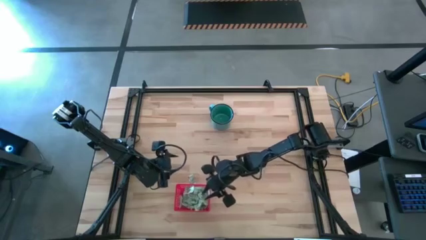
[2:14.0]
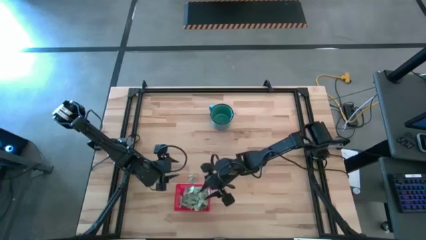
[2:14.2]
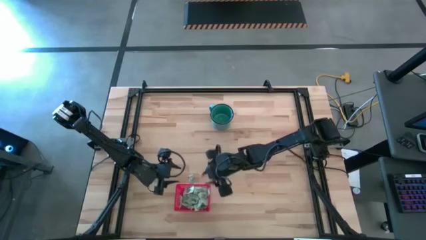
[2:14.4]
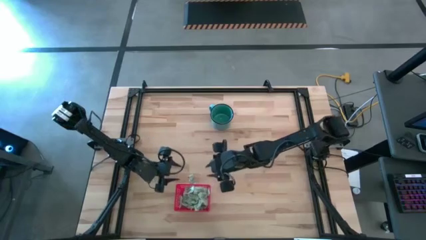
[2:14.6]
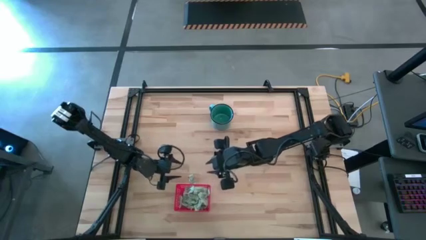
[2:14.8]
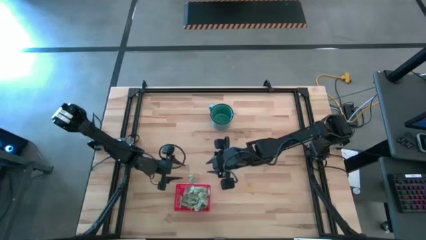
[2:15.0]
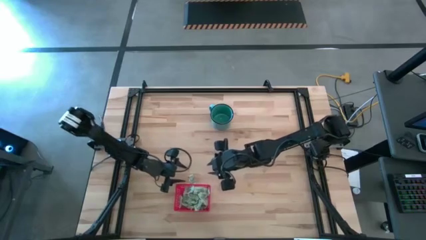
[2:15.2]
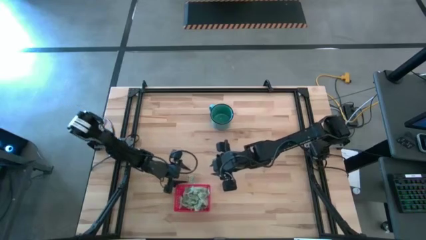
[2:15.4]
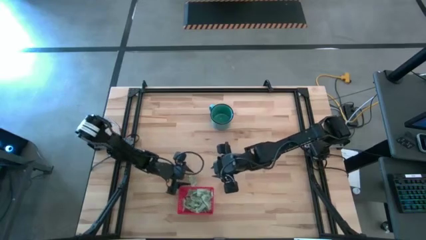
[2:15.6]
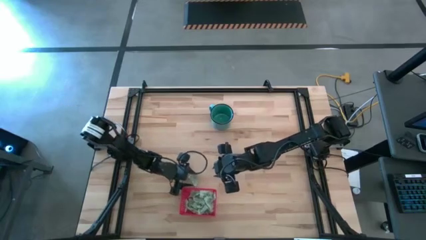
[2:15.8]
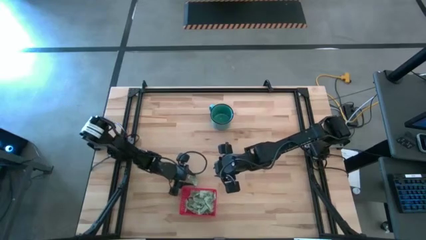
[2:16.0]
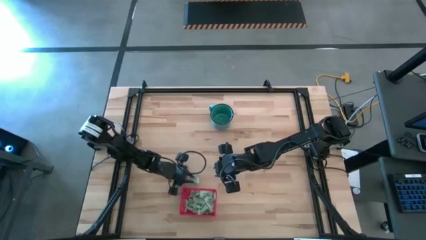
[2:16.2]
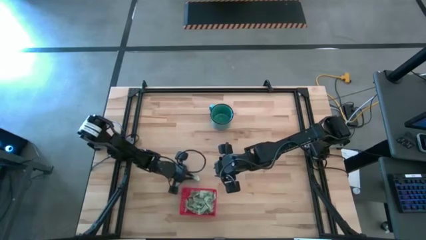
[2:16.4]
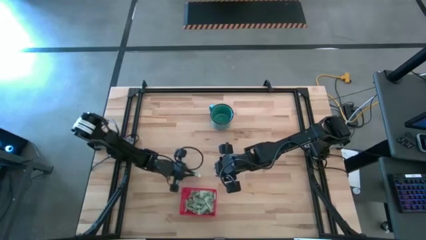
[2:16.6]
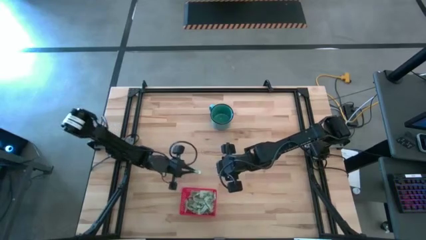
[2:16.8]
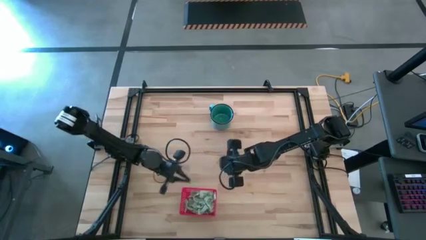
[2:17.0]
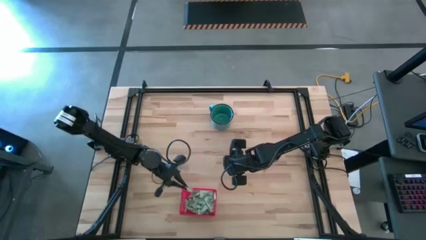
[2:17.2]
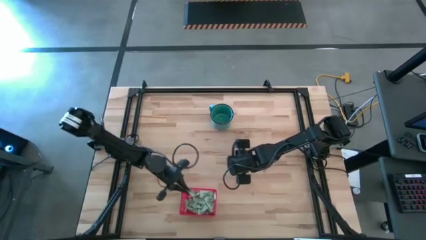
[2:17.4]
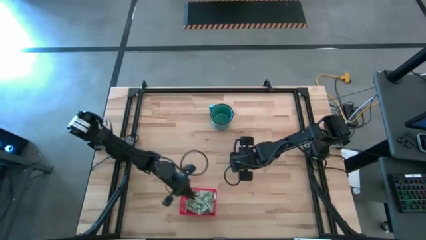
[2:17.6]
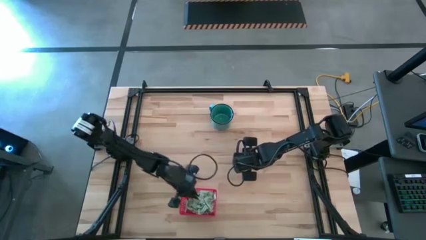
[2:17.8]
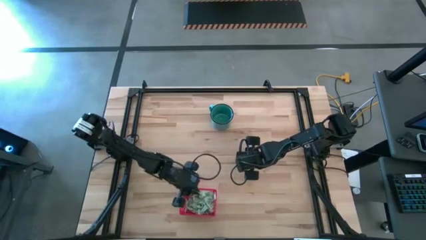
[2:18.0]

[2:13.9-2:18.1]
Task: Pick and place items into bin
Put the green stevia packet into the red bin

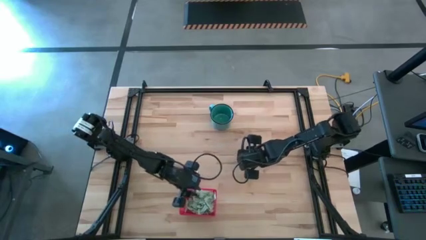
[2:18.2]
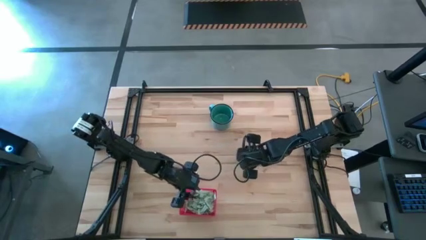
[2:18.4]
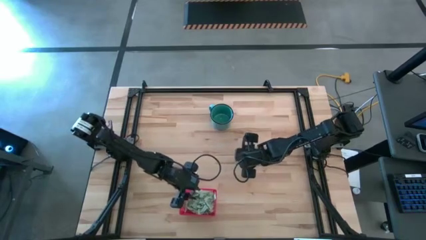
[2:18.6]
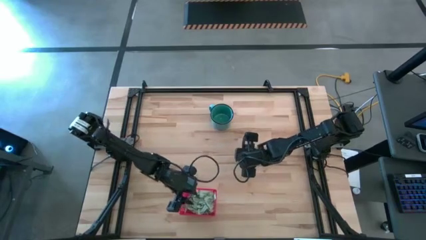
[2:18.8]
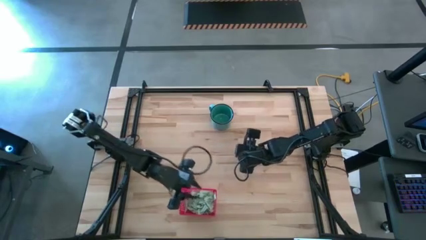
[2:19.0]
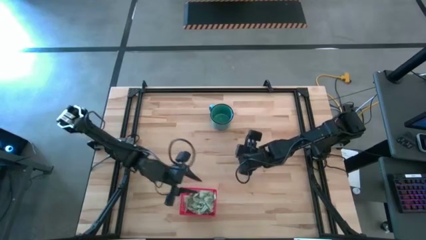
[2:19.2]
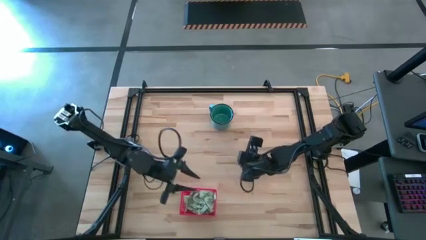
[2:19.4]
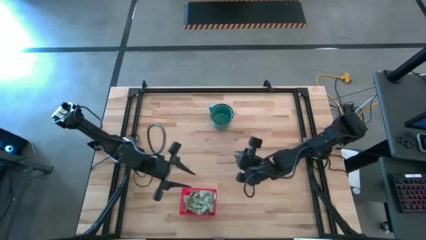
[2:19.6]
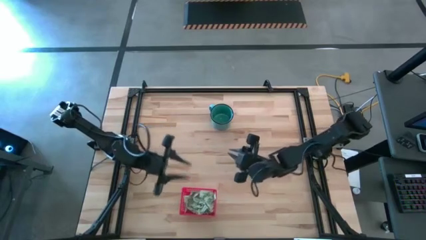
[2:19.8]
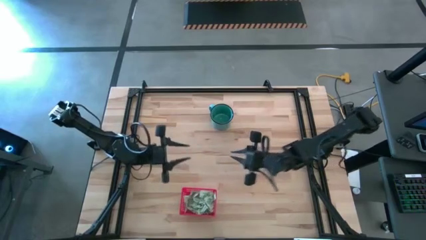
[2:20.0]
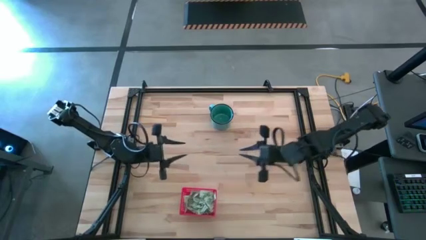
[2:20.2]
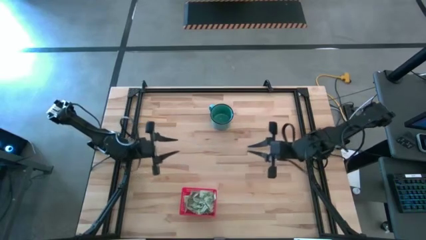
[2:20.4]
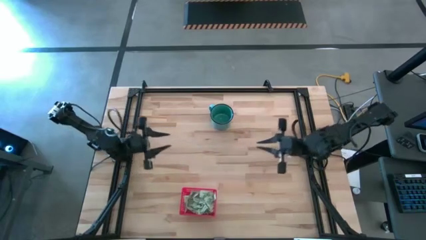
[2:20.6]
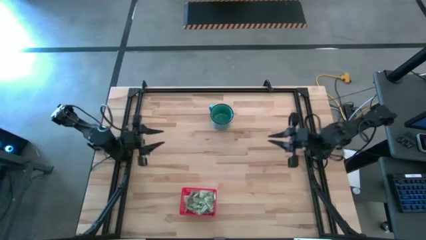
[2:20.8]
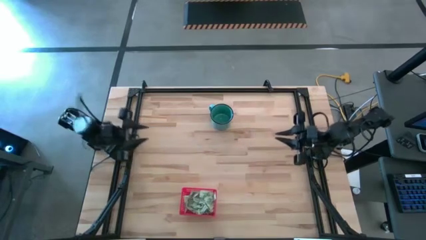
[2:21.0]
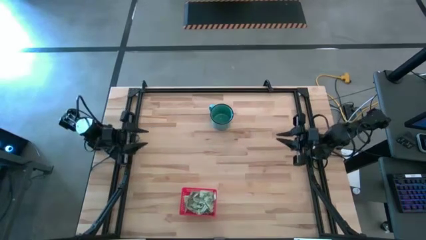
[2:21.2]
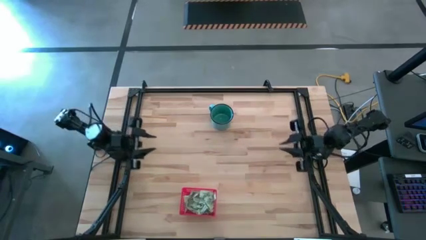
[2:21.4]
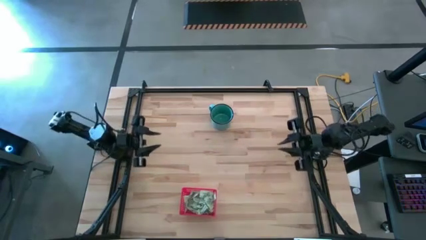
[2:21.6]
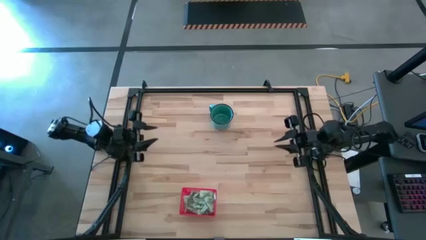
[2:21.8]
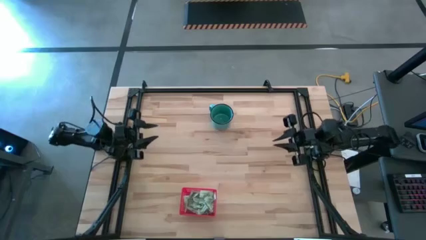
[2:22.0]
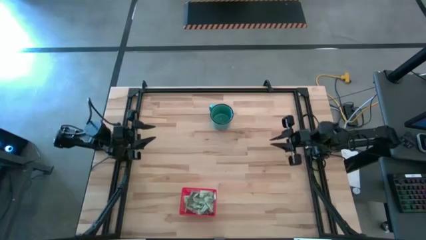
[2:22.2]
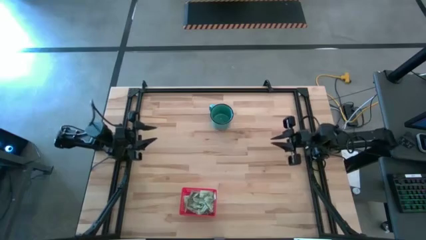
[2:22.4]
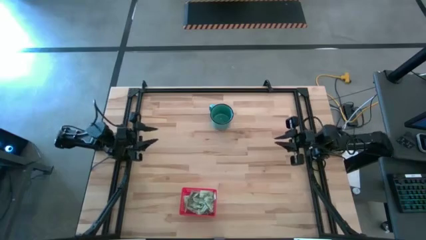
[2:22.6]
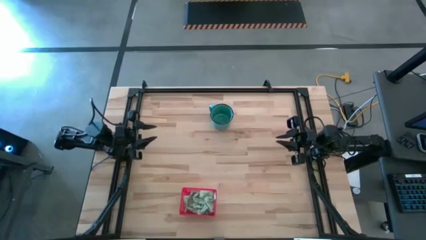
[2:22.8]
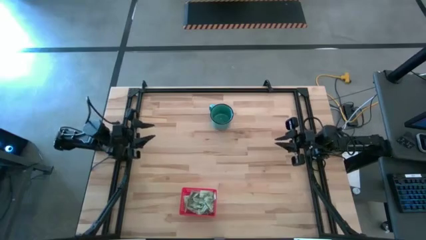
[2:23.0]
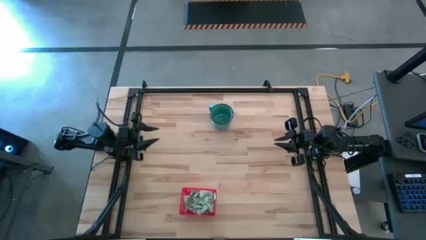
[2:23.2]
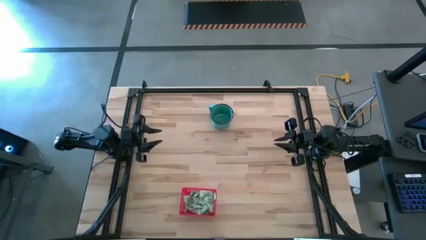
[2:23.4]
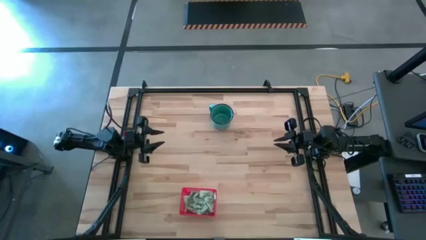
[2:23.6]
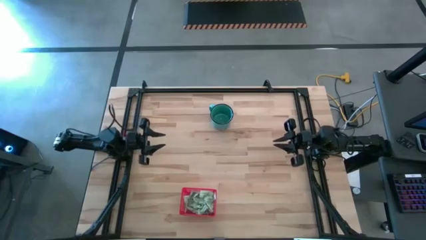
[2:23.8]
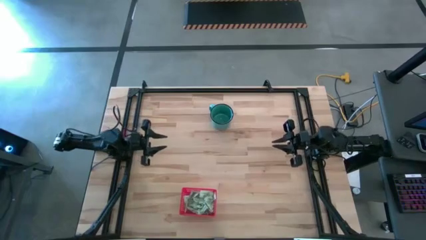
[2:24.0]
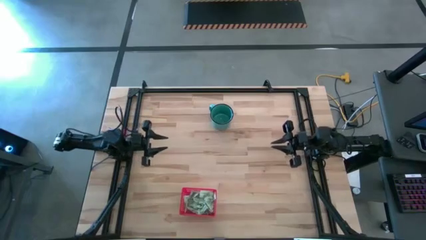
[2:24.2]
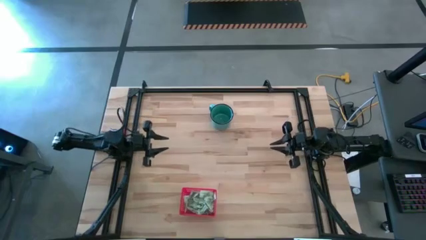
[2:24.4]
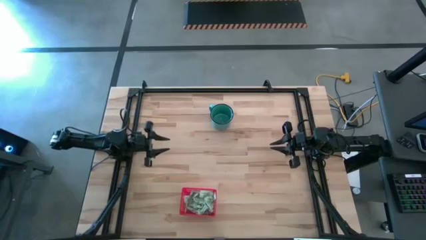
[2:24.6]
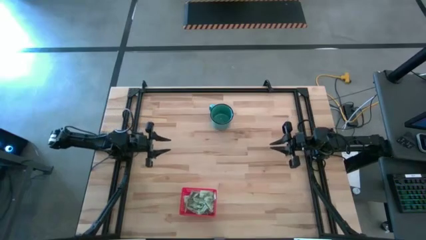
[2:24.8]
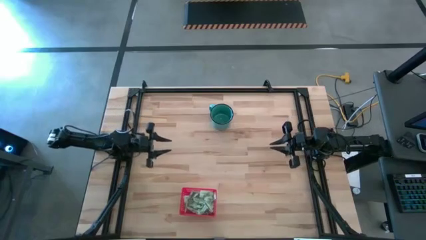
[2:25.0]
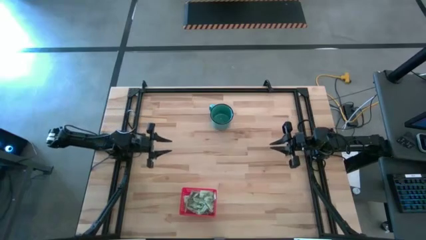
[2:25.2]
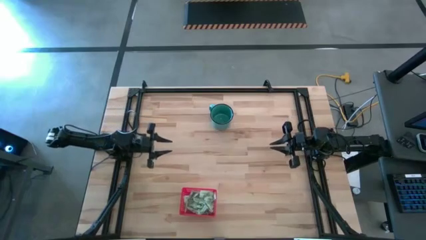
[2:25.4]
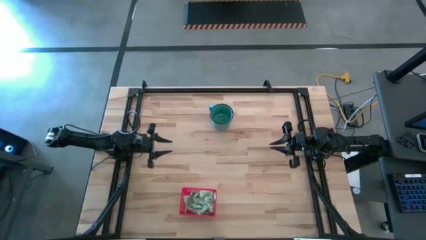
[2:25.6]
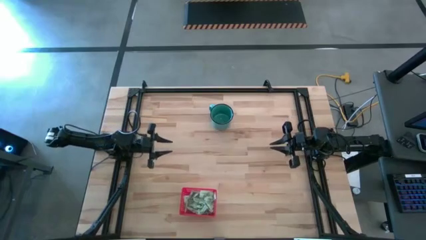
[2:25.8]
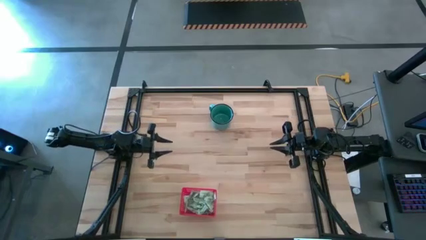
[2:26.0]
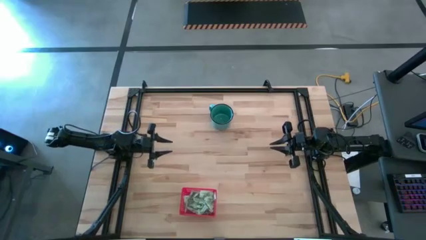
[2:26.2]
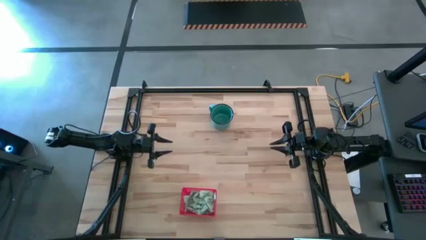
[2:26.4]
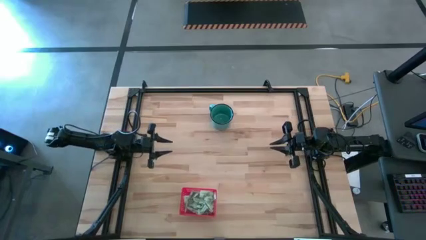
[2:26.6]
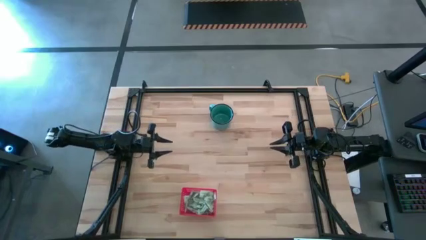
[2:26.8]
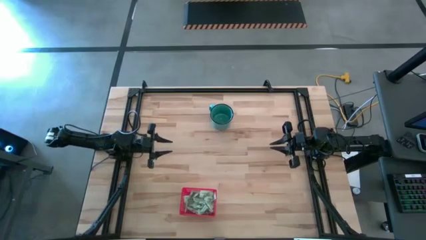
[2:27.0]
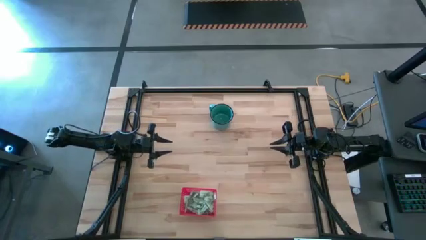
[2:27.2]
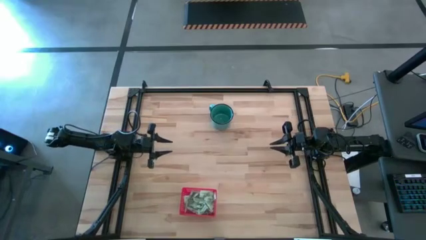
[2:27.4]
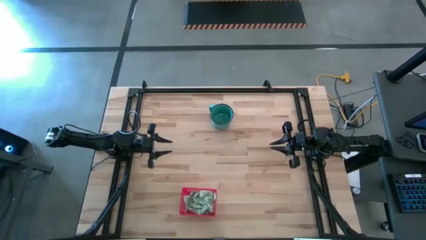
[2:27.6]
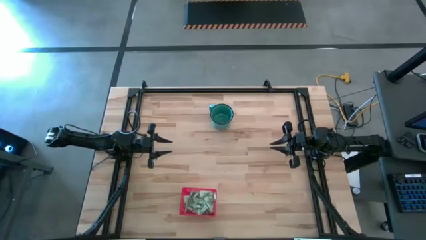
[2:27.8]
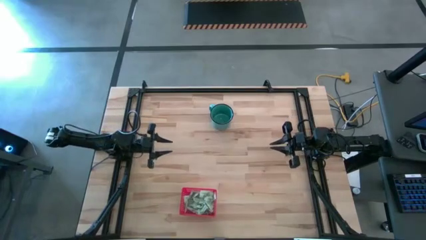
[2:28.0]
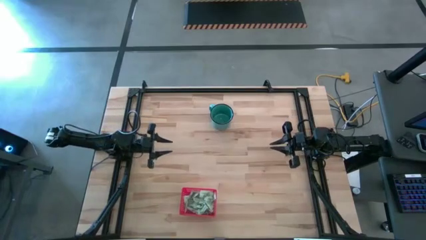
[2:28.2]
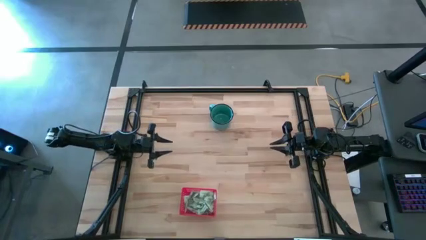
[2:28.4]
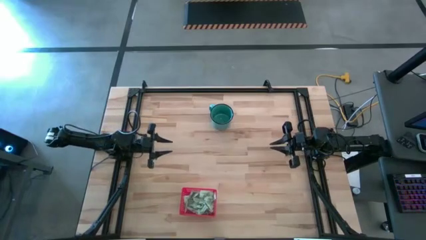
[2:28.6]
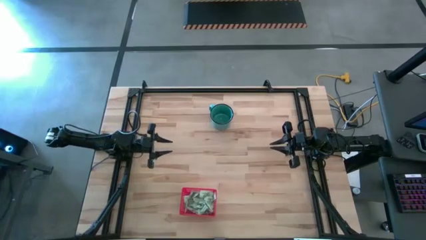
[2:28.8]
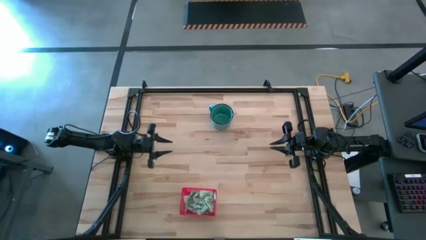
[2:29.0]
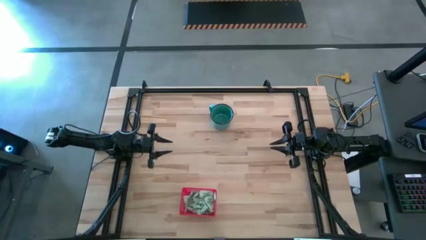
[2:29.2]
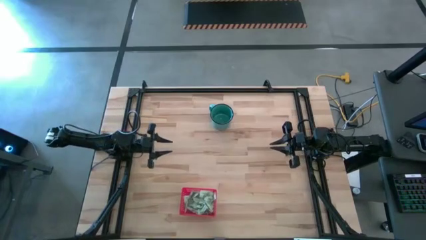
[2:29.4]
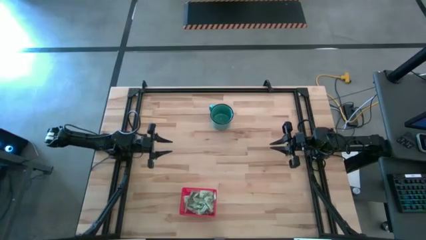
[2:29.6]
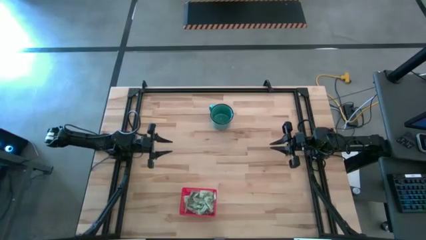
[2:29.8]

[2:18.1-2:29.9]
Return to Home Position

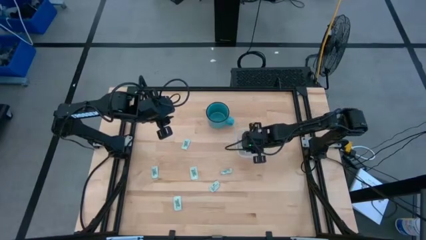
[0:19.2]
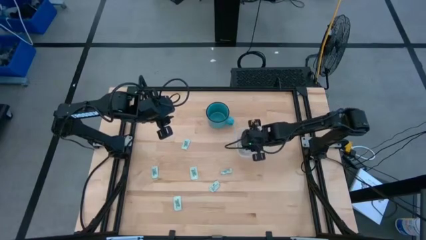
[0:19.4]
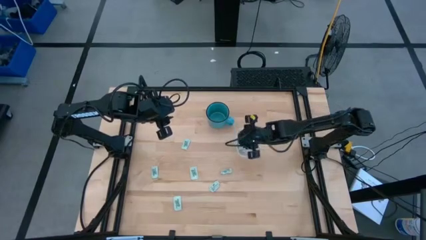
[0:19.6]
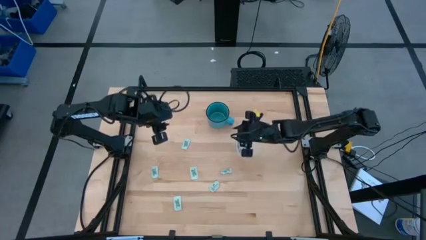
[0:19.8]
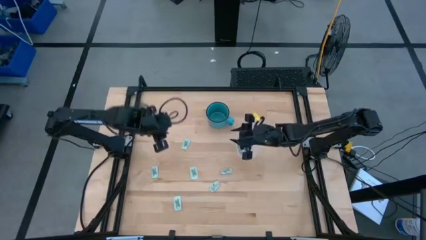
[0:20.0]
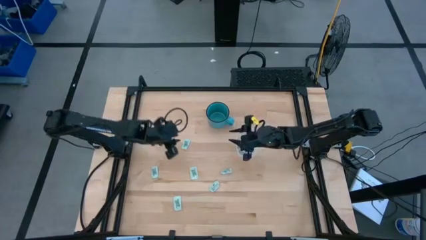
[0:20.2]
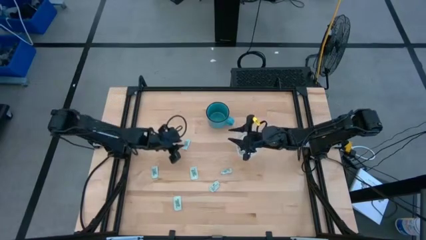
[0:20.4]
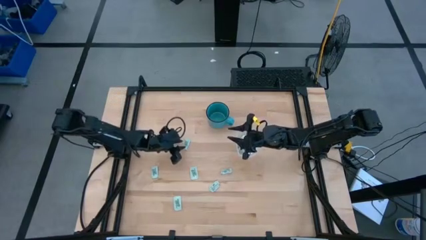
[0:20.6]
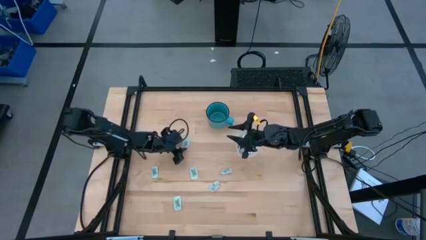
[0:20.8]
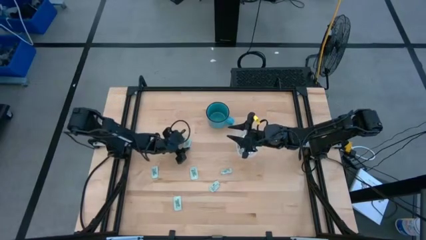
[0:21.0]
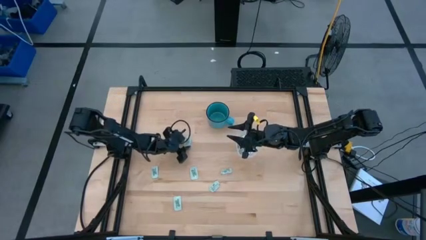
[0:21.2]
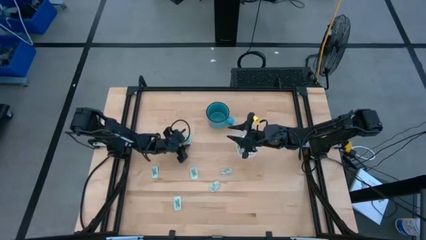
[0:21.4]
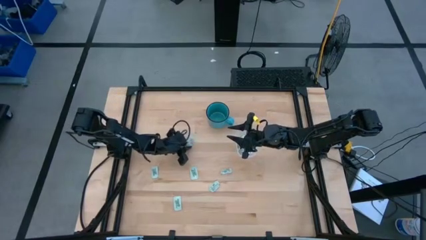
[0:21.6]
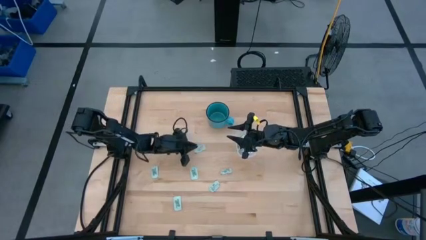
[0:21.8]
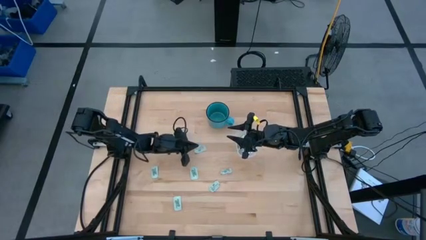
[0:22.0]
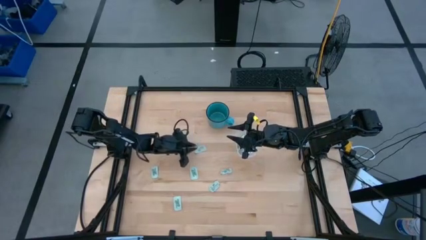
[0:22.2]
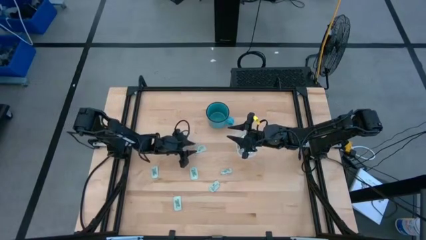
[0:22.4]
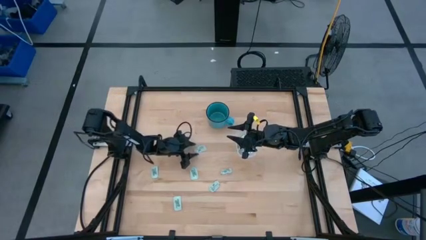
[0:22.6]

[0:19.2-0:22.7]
Task: Pick and place Stevia / Truvia into bins
Put the stevia packet into the transparent bin
